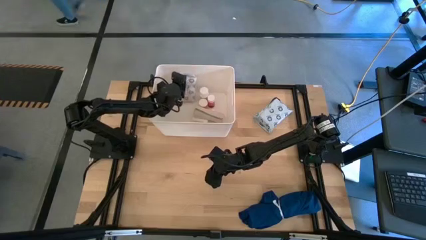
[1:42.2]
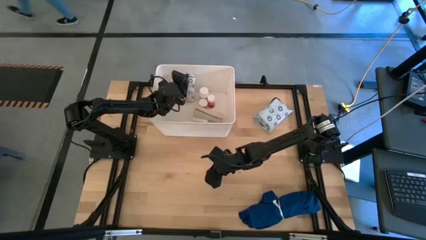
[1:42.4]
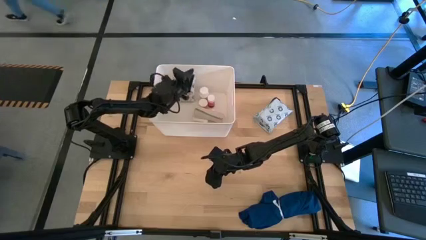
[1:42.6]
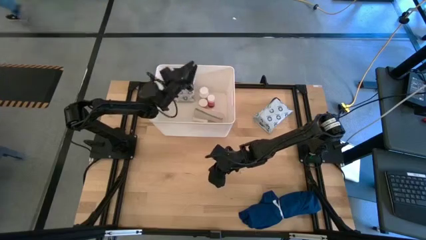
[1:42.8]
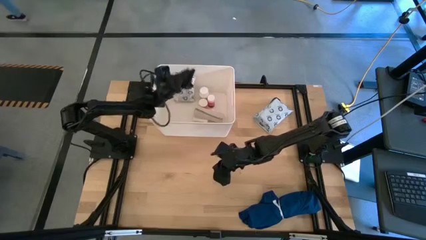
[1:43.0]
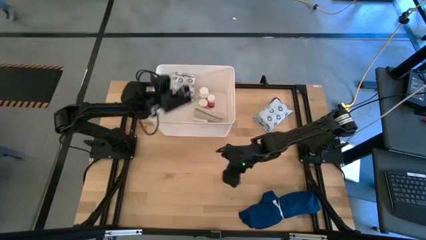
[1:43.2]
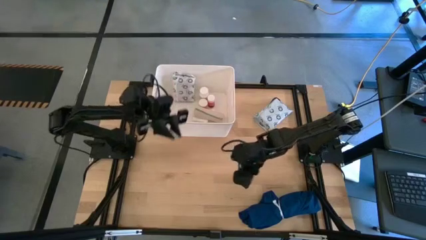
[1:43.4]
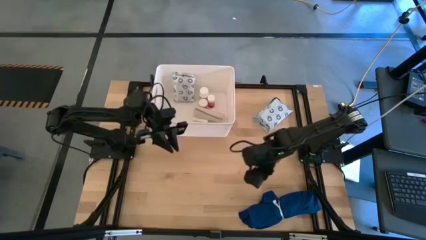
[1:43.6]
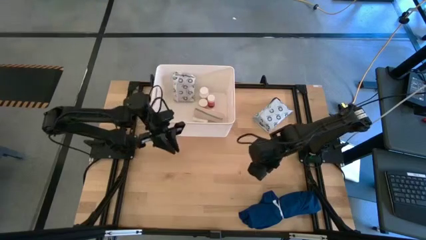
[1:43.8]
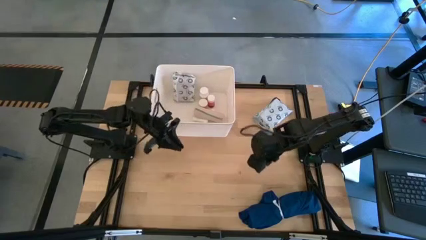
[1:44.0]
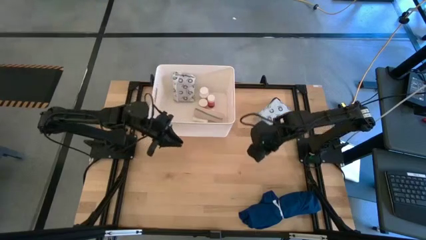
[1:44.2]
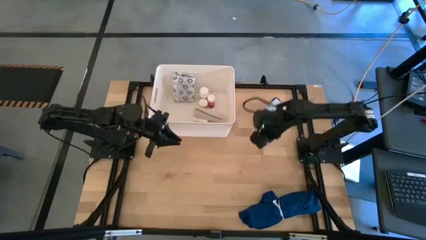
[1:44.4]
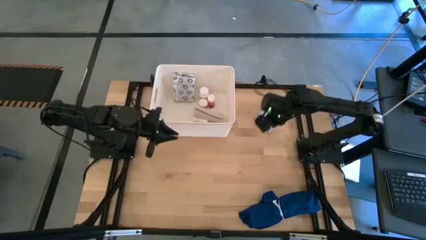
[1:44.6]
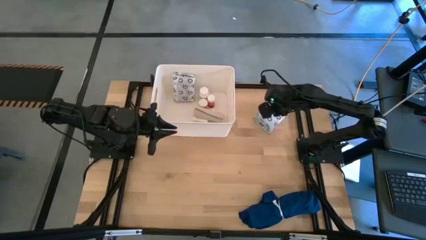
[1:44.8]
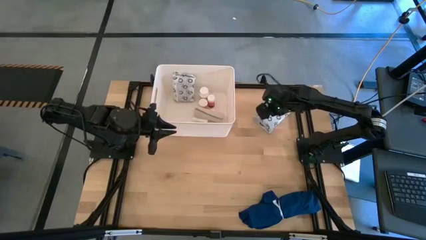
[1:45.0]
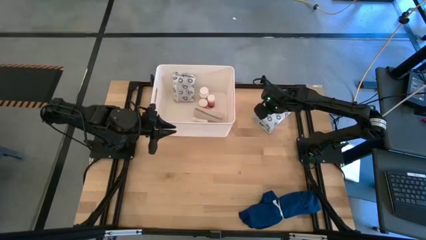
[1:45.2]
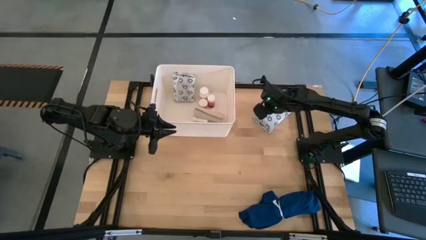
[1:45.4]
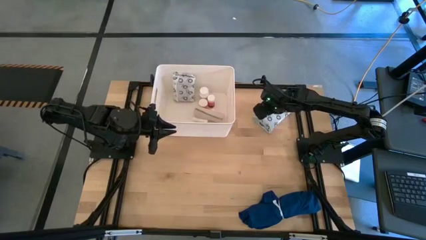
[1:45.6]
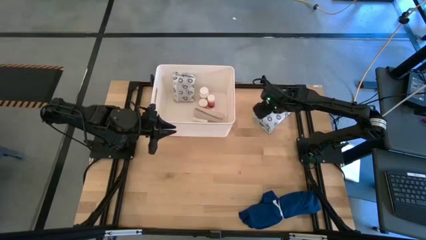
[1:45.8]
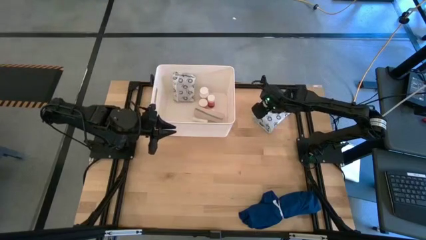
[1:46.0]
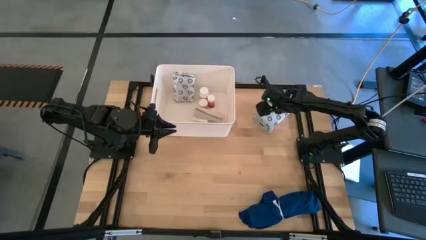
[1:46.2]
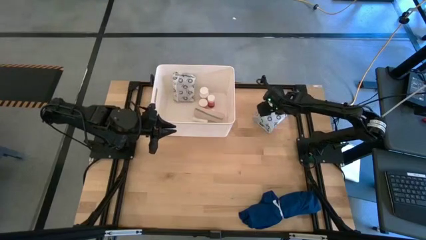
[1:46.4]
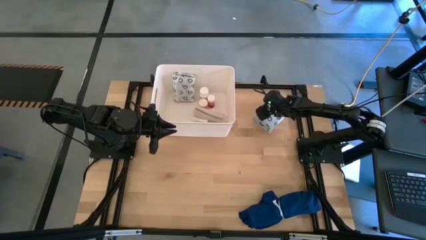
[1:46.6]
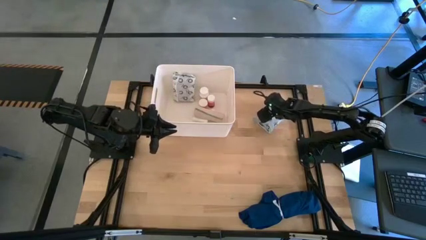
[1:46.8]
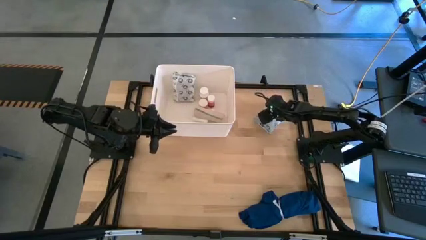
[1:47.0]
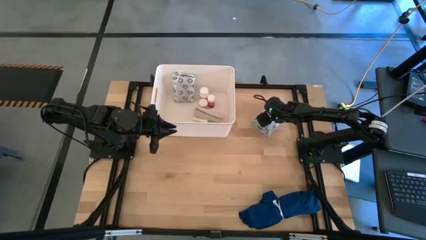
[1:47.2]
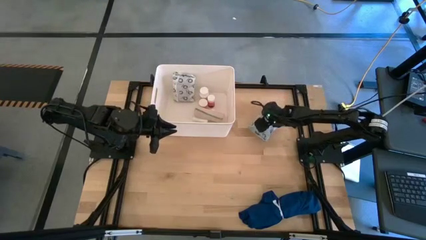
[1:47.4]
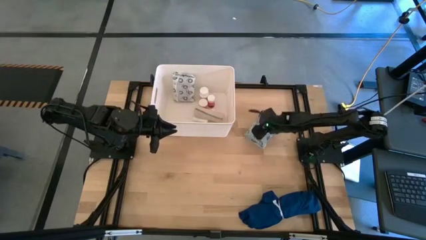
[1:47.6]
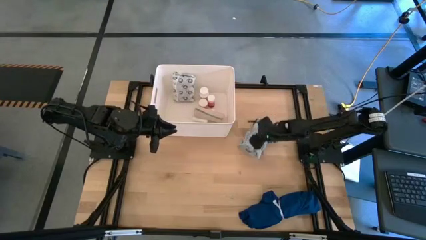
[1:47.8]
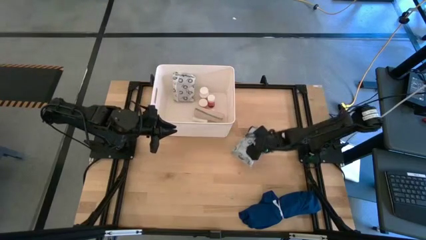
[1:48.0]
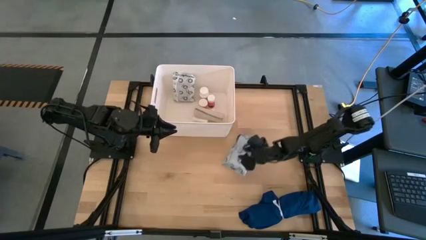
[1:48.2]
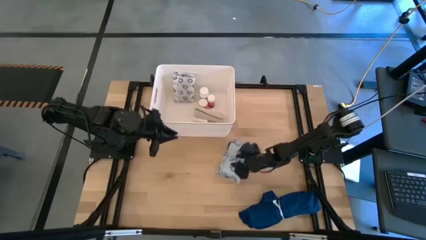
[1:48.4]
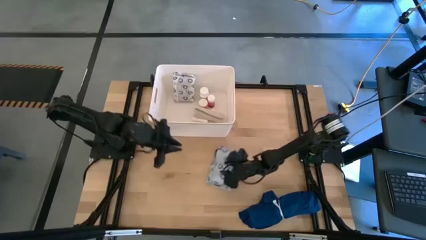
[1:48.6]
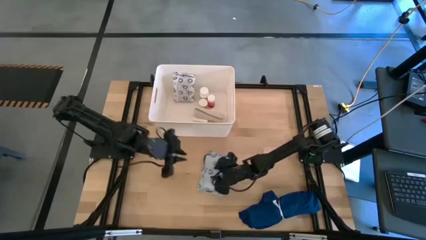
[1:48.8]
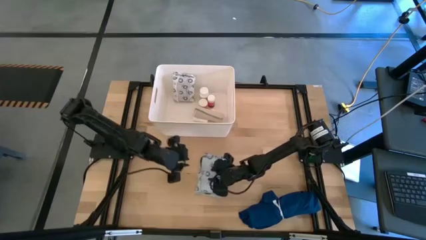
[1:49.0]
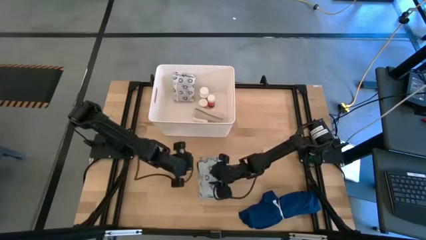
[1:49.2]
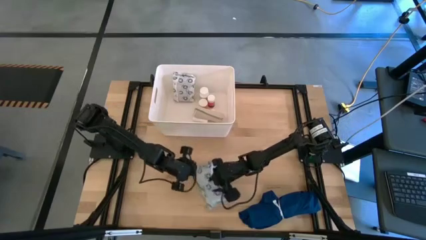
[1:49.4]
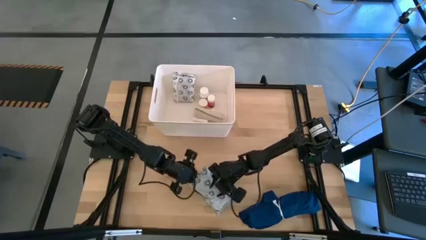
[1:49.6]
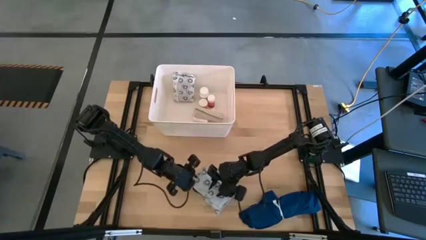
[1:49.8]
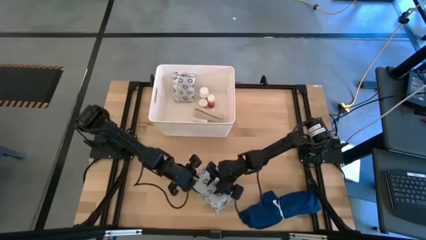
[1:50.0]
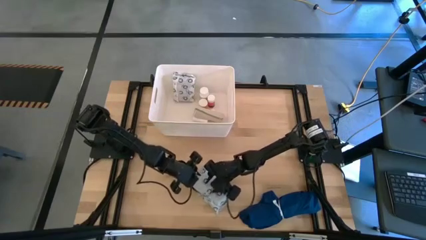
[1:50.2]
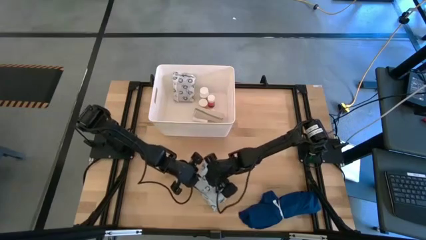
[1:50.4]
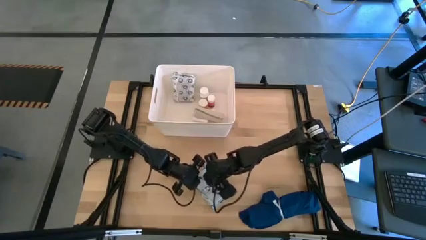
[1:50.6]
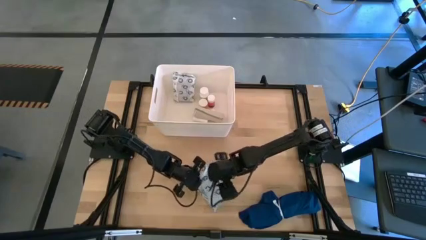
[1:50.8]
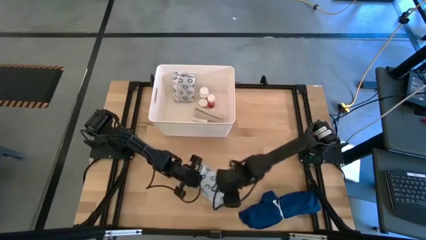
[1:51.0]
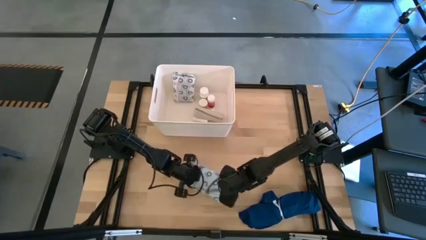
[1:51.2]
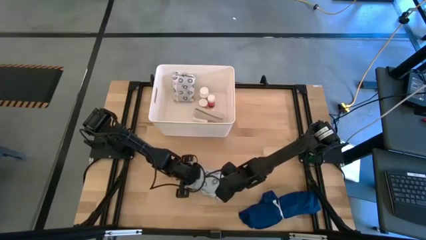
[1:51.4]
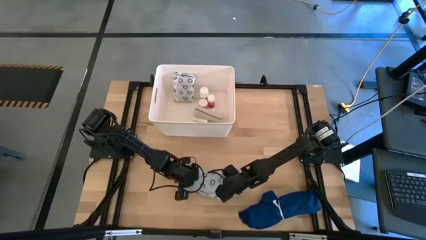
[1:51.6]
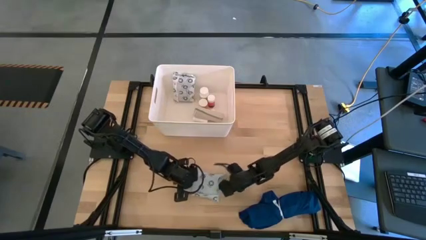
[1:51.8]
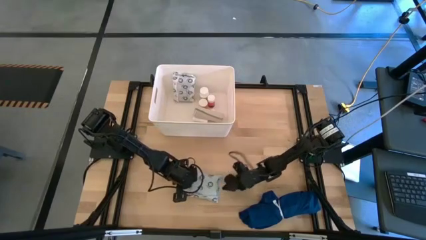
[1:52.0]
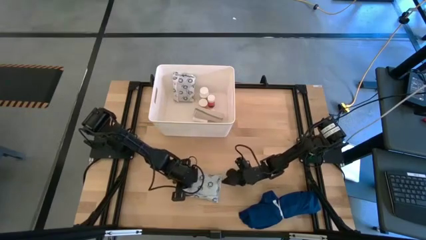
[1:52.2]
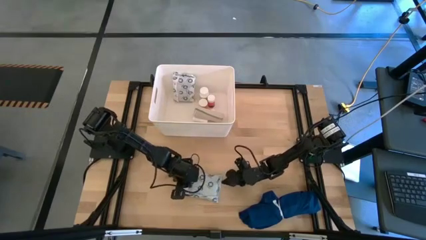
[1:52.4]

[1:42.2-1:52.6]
Task: Pick & place medical supplies in basket/bin
Put the mailer bag into the white bin
